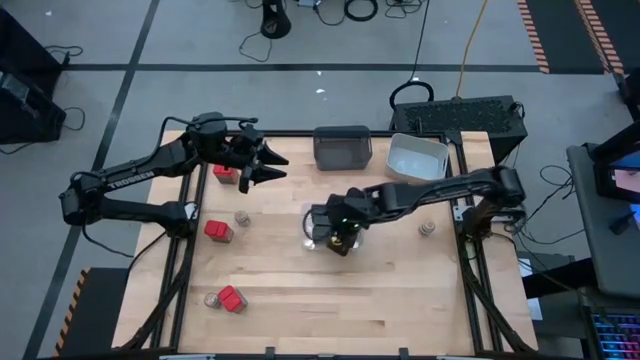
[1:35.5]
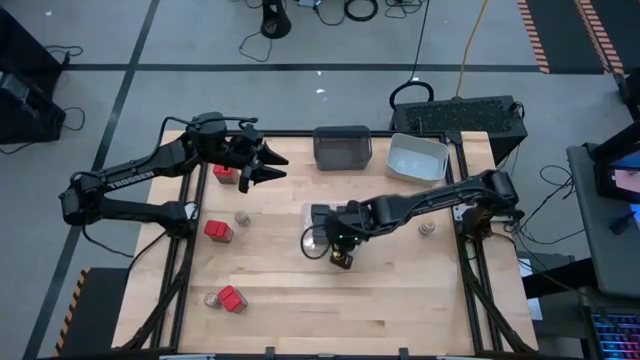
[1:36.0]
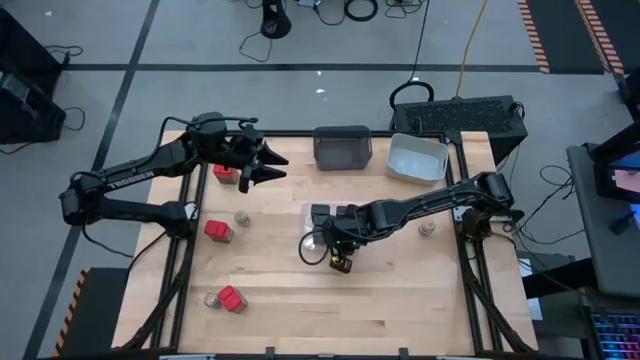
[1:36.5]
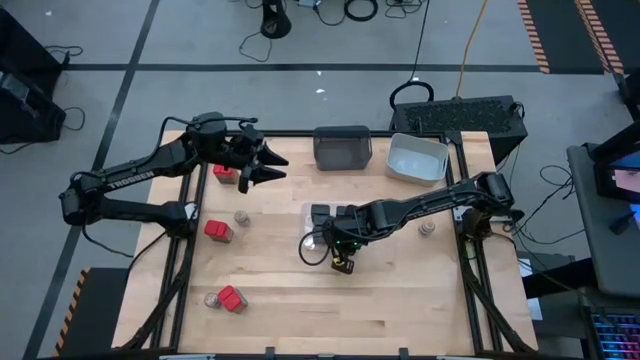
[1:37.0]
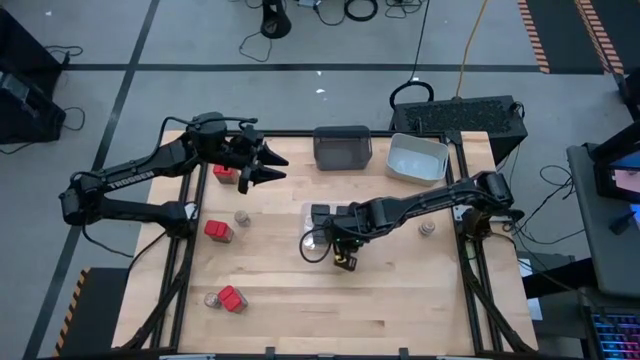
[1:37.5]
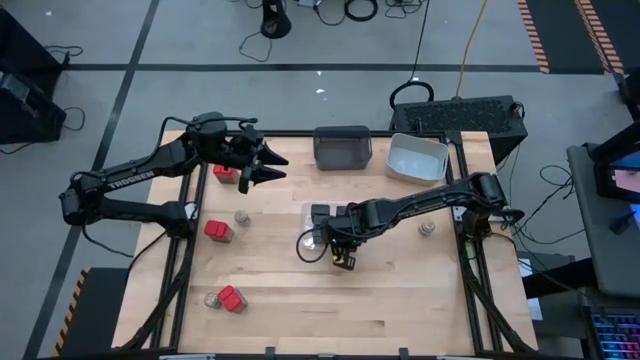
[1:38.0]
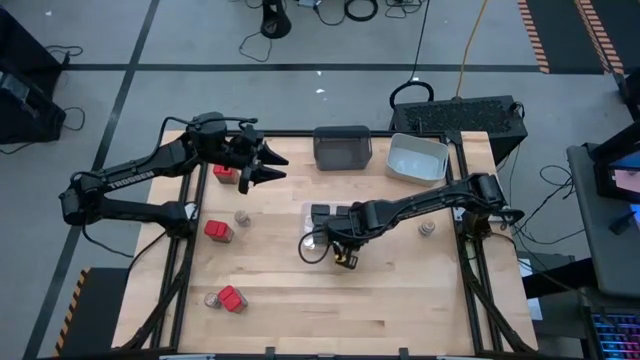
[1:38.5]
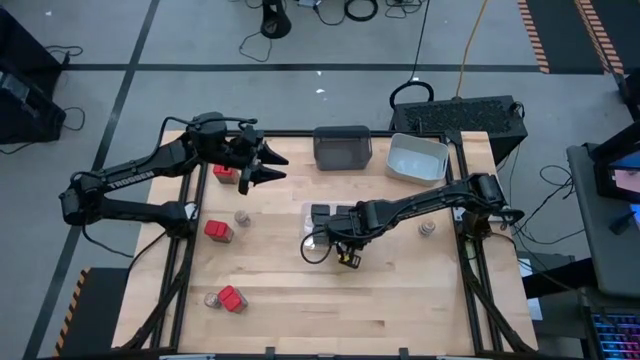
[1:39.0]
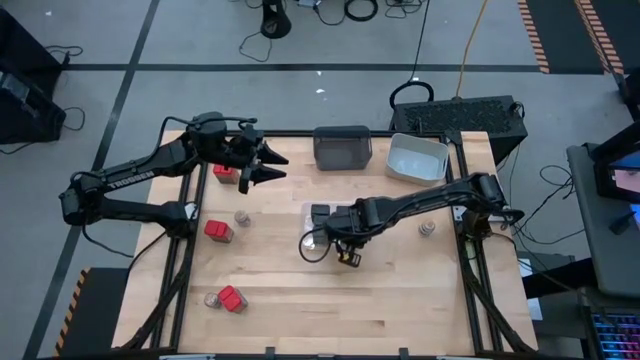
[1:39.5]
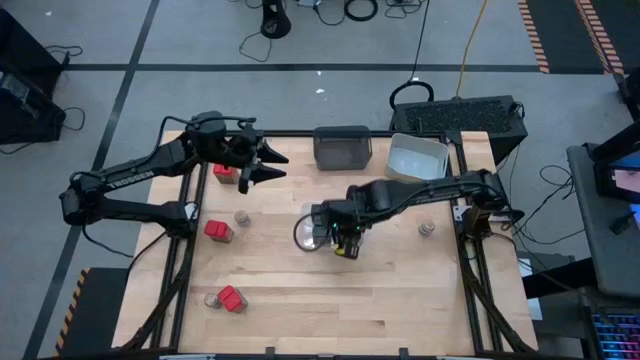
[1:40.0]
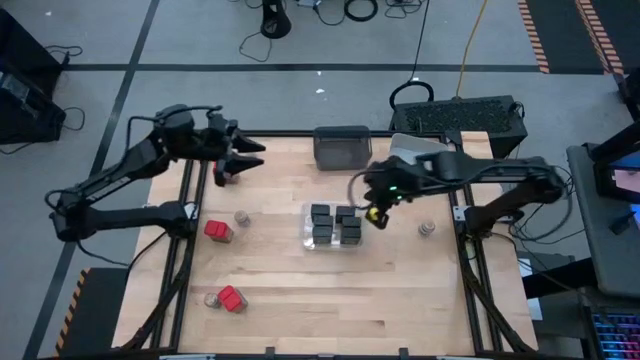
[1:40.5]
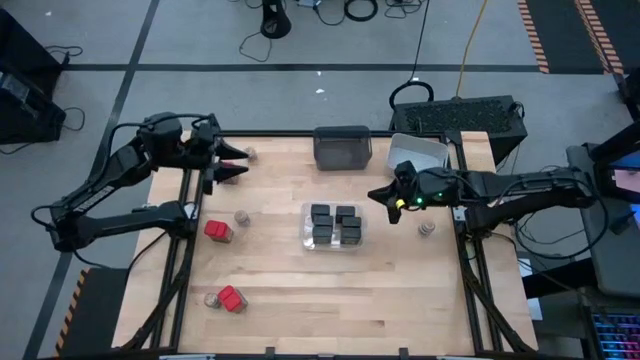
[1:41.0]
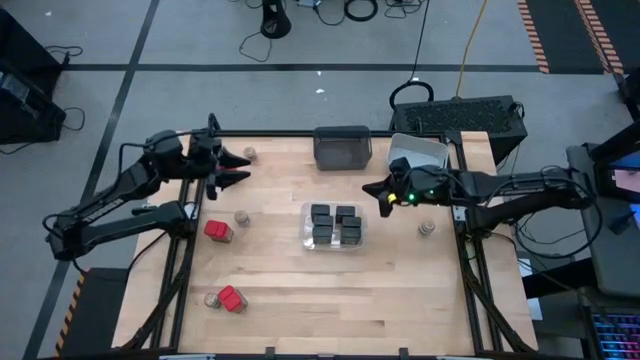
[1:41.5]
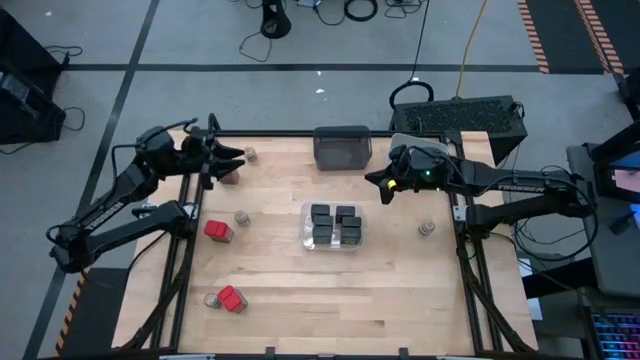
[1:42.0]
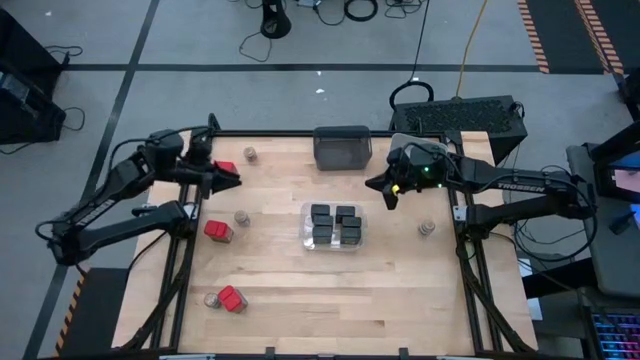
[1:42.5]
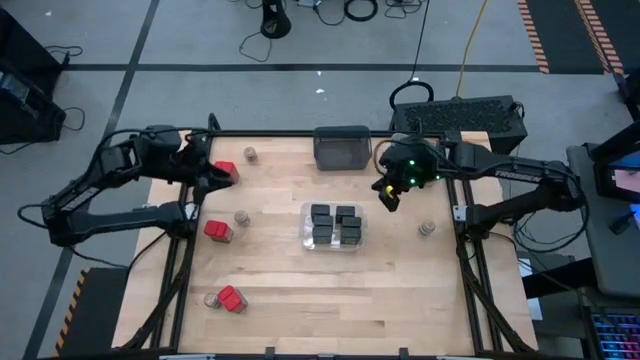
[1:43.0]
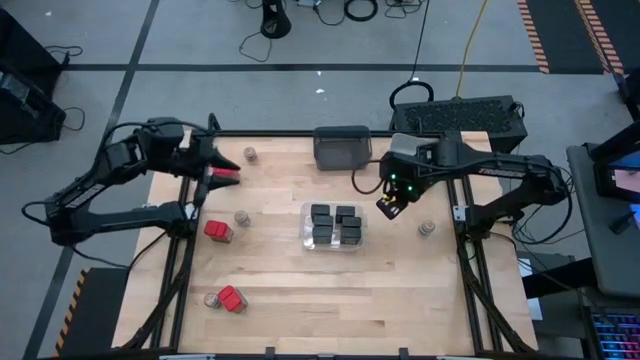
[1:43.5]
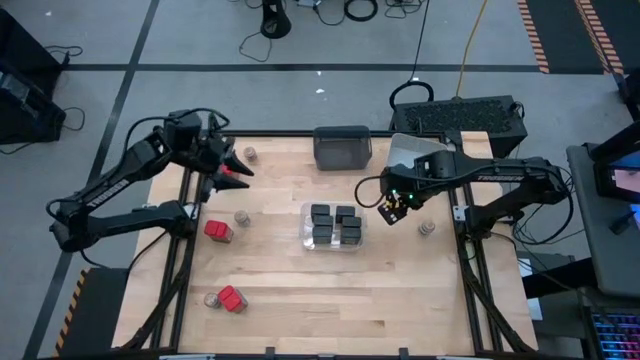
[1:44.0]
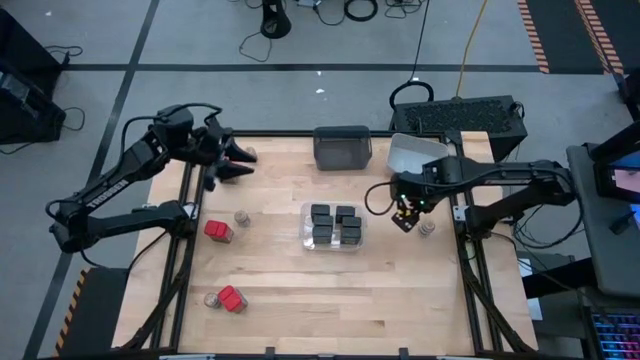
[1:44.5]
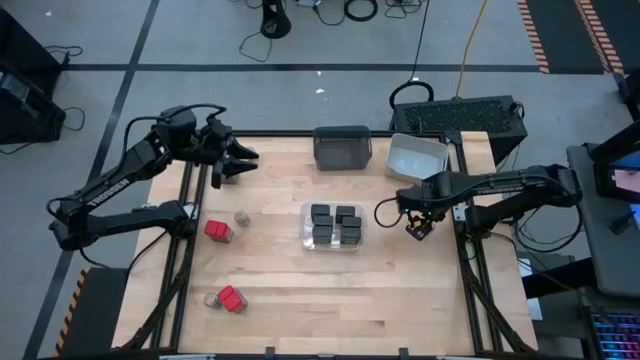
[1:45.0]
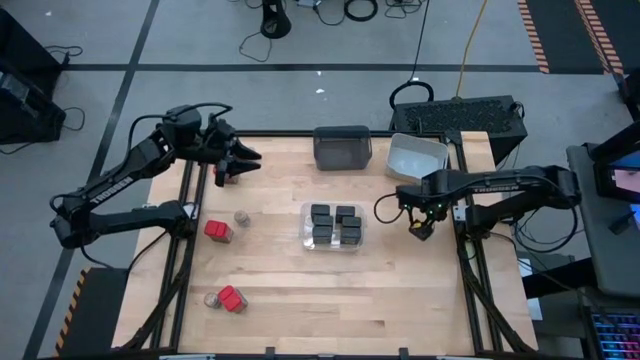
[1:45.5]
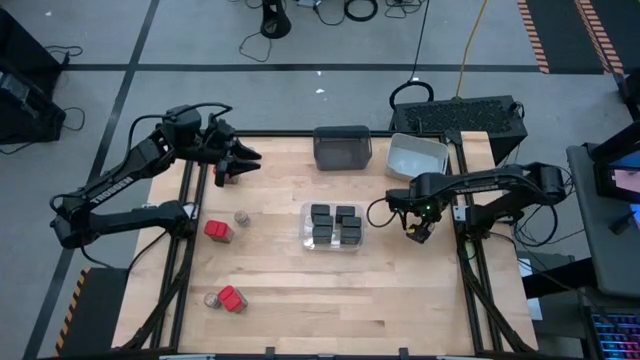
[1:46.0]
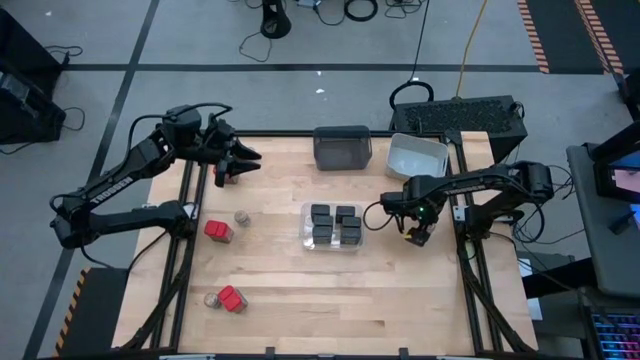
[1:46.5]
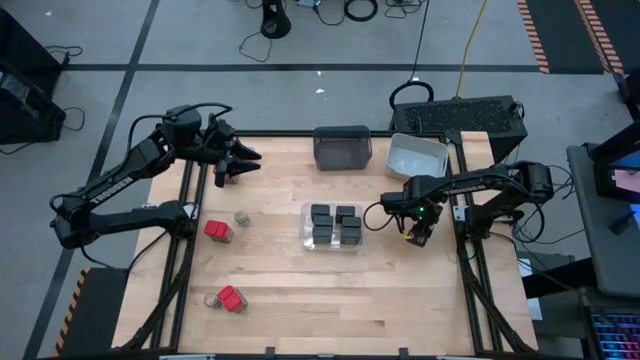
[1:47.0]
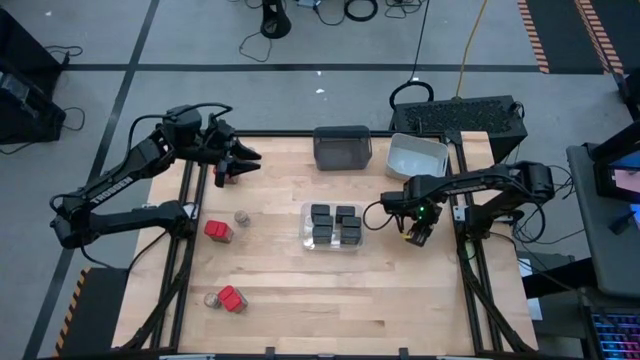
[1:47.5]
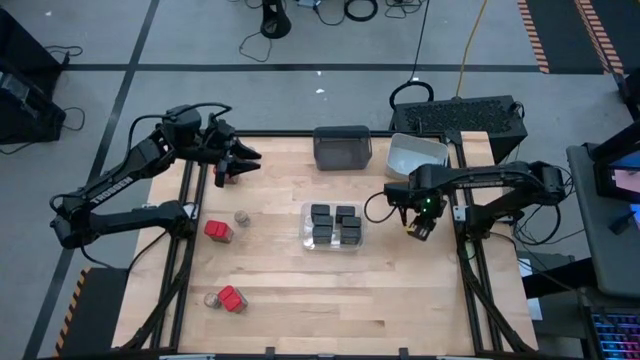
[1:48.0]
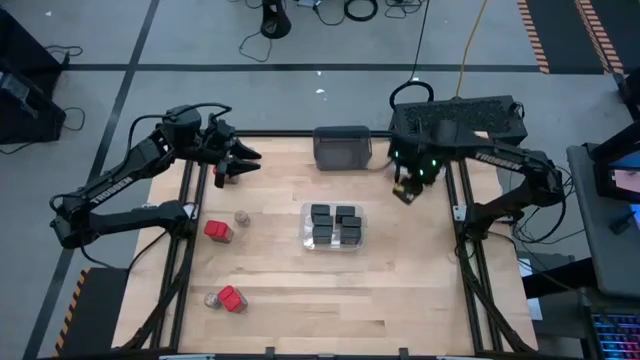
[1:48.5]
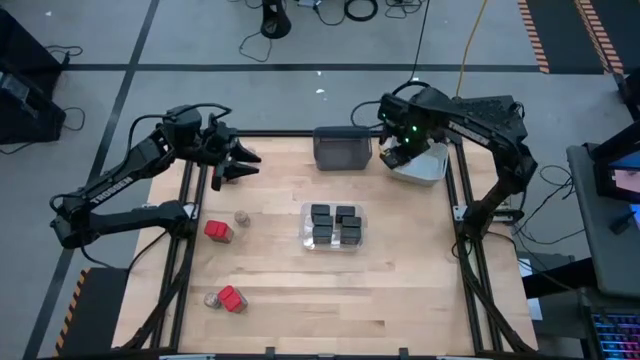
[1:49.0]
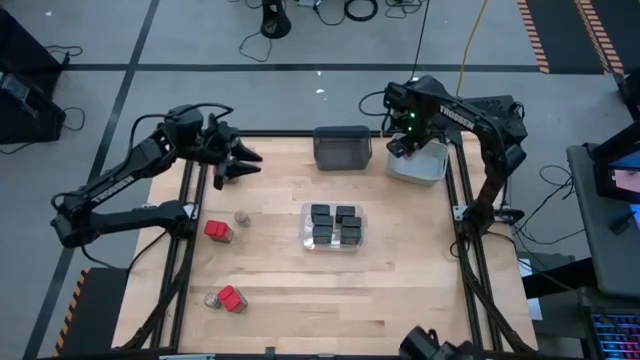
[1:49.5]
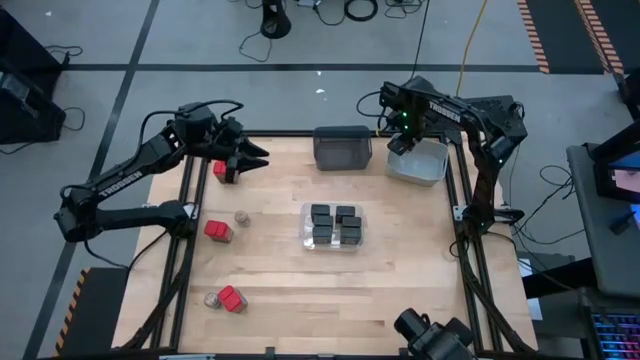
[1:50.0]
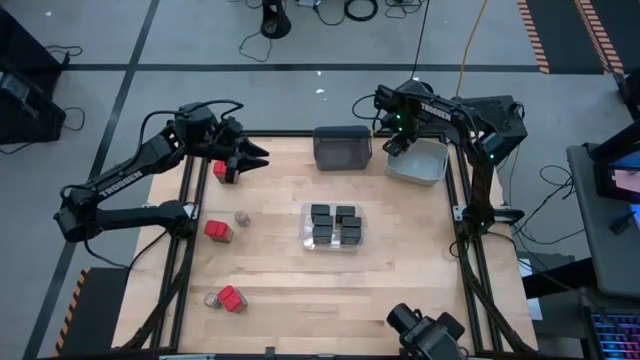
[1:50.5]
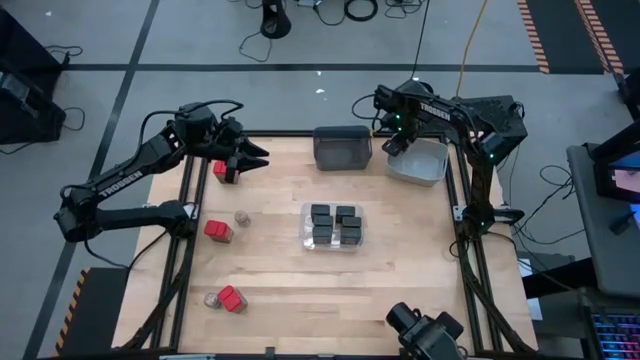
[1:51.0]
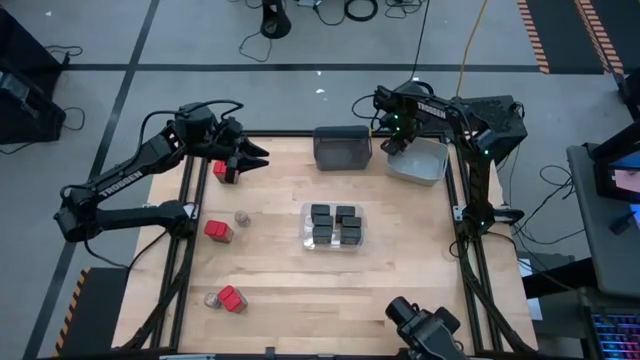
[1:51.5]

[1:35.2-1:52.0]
Task: Sort spices by type
Put the brown seasoning bottle into the gray bin

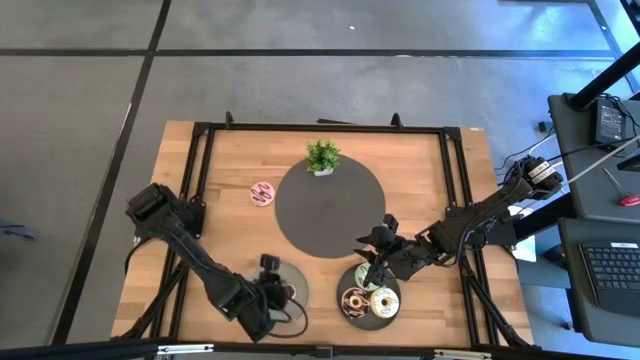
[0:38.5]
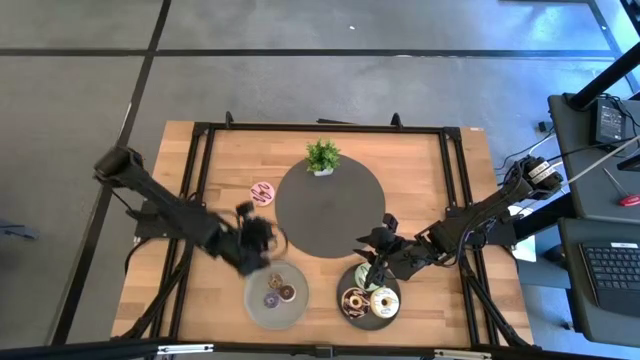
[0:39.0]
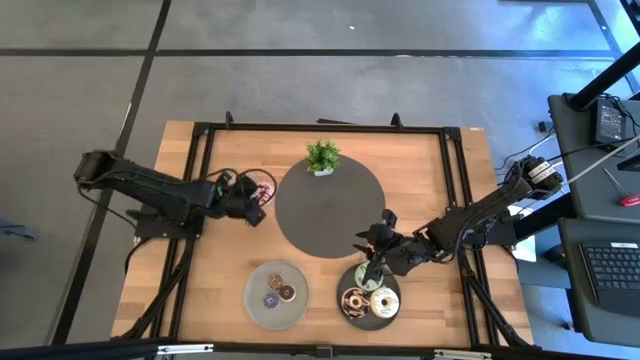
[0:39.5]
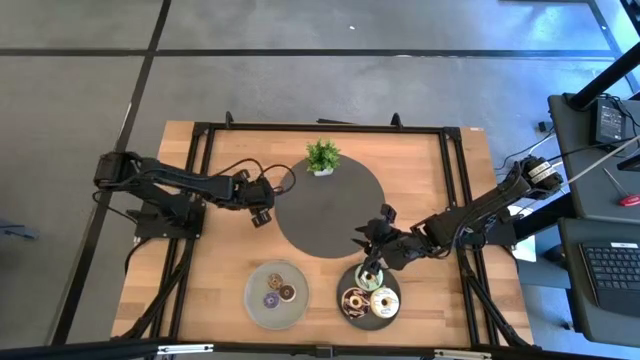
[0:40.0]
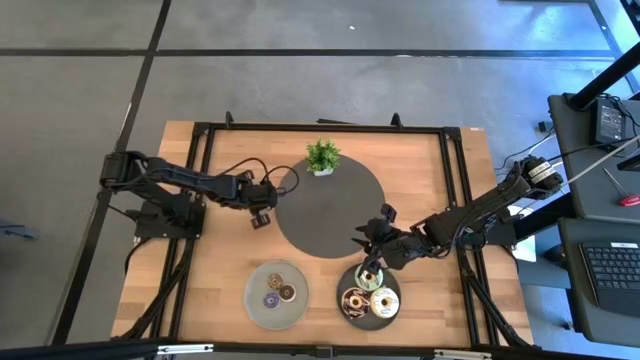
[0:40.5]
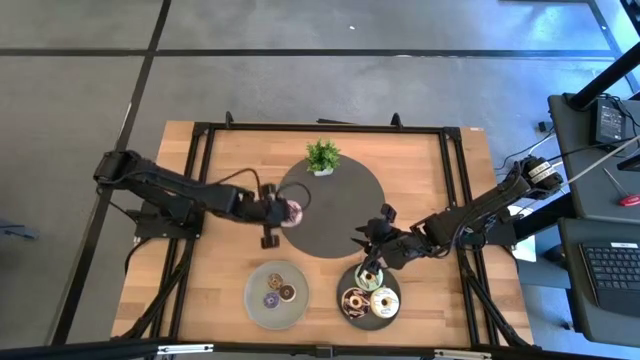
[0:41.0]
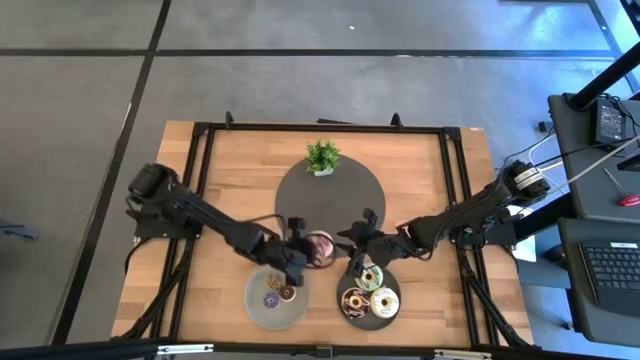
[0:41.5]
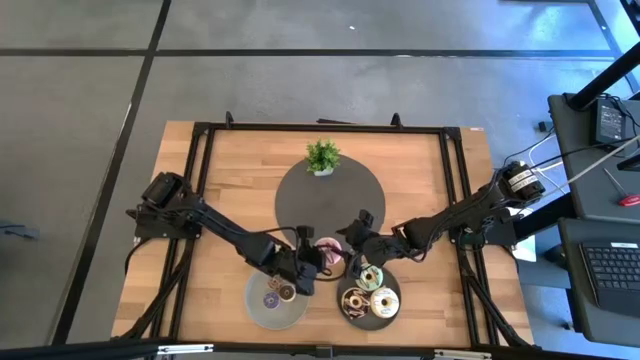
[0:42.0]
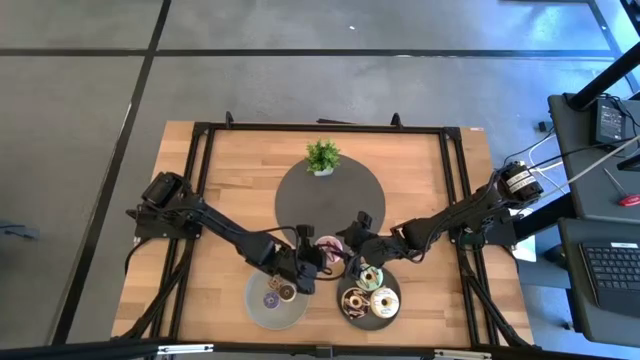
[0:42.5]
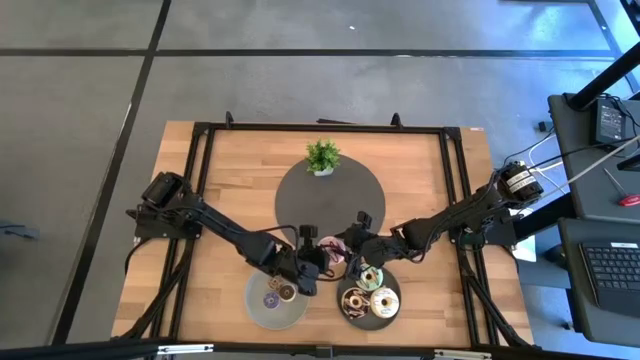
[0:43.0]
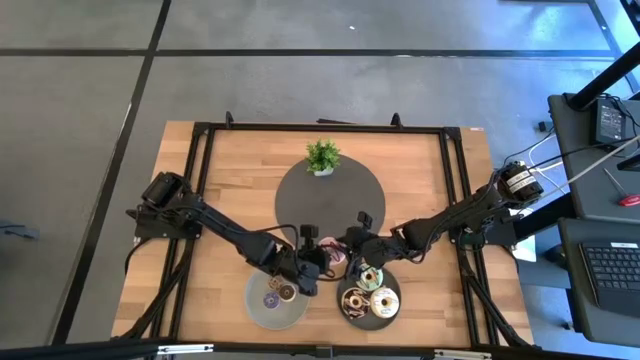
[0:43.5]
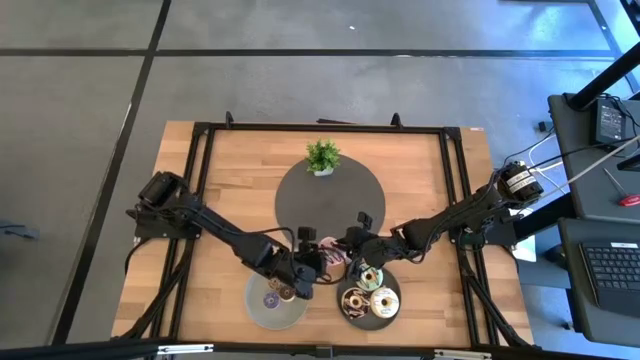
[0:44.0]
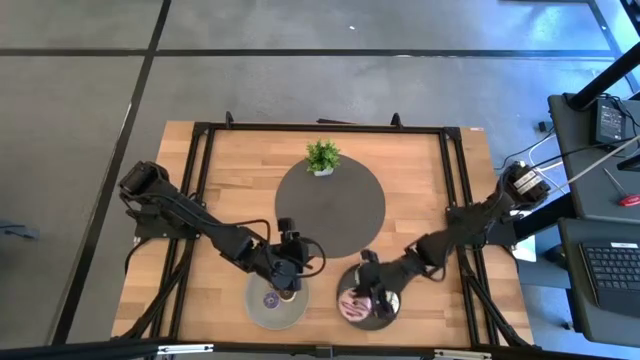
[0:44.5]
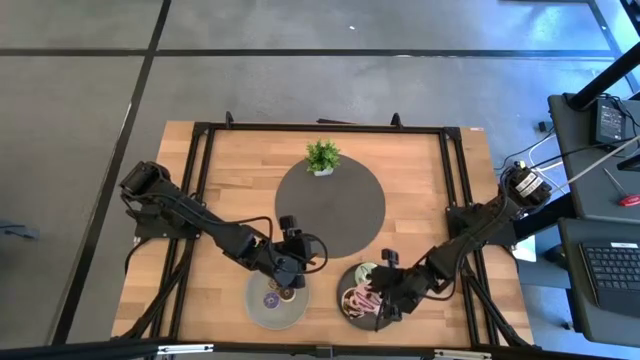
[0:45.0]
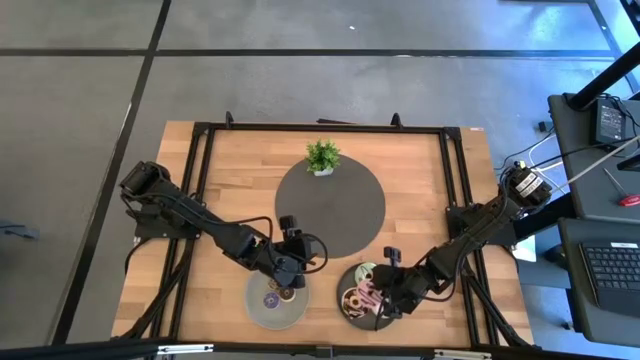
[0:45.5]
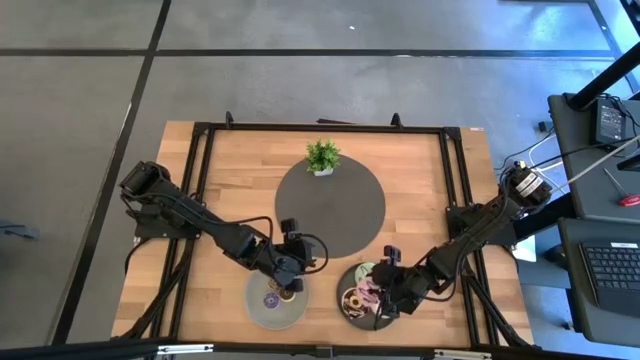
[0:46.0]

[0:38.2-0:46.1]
Task: Pick & Place donuts
Put the big purple donut on the black plate
